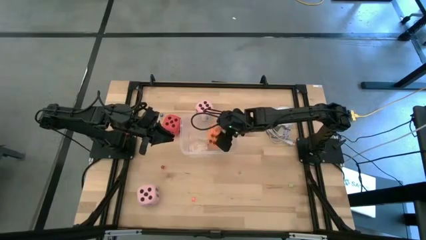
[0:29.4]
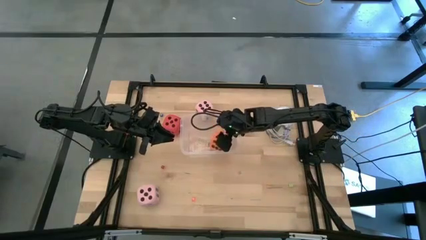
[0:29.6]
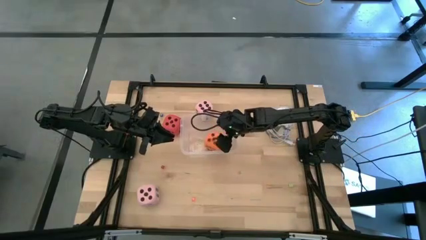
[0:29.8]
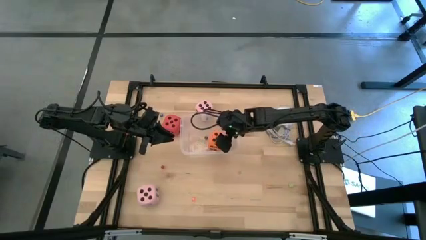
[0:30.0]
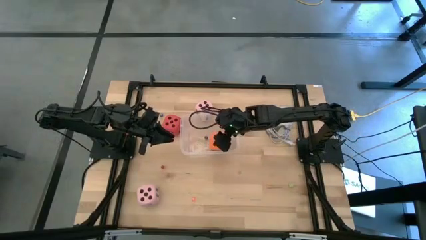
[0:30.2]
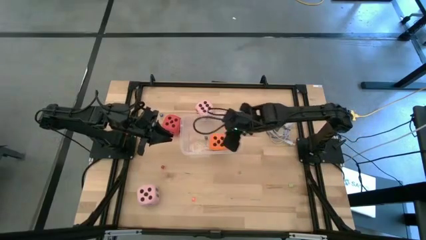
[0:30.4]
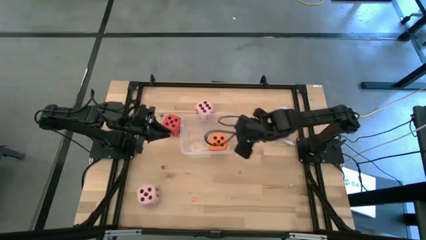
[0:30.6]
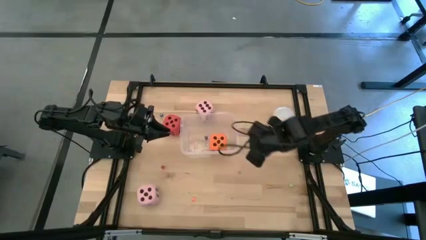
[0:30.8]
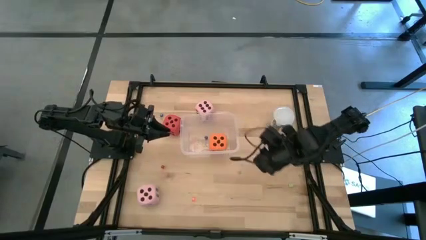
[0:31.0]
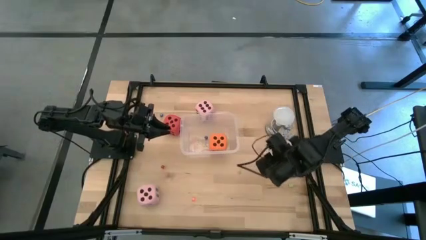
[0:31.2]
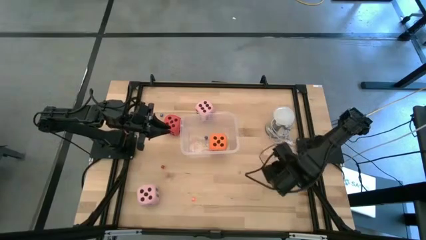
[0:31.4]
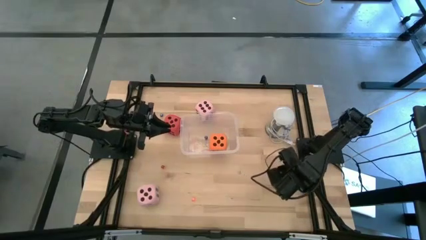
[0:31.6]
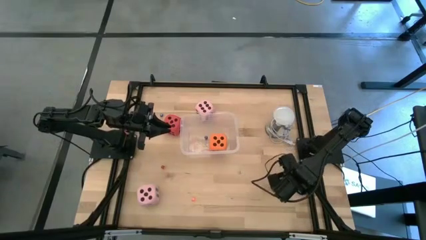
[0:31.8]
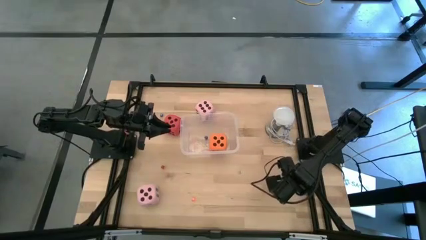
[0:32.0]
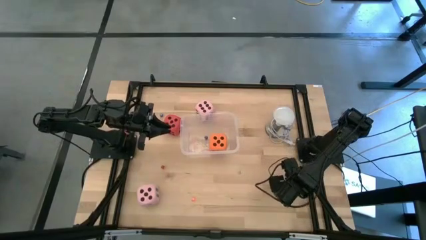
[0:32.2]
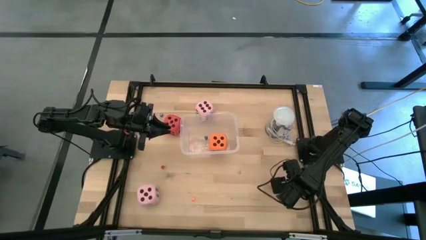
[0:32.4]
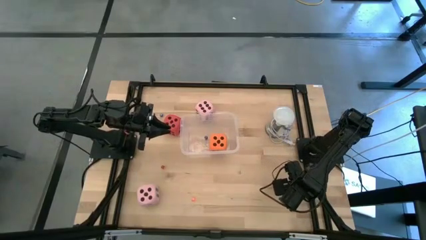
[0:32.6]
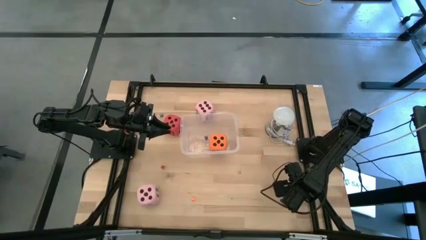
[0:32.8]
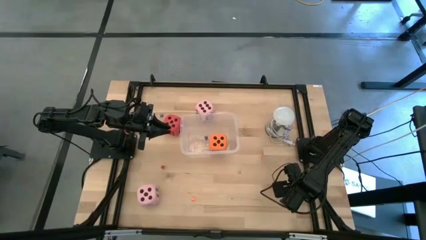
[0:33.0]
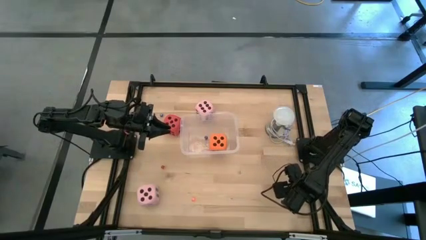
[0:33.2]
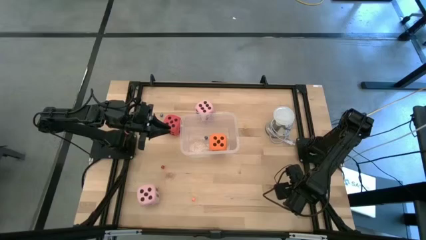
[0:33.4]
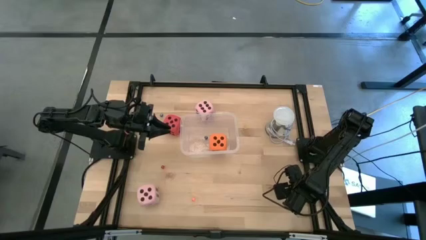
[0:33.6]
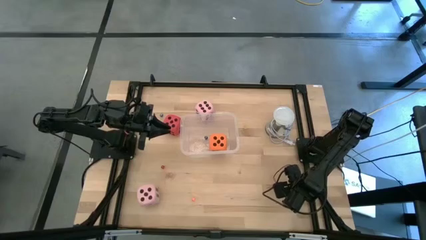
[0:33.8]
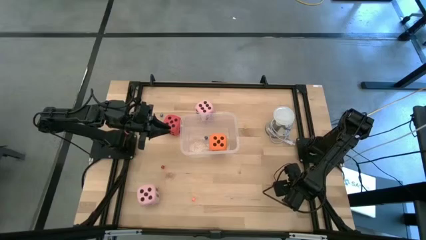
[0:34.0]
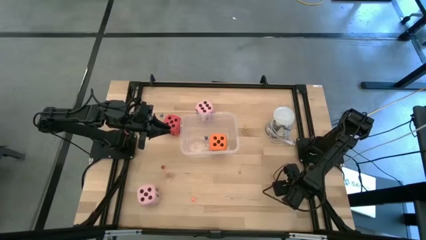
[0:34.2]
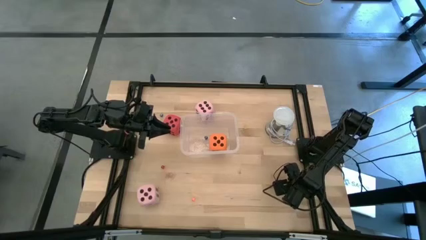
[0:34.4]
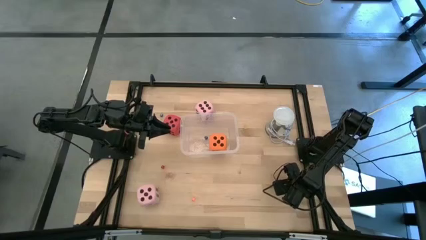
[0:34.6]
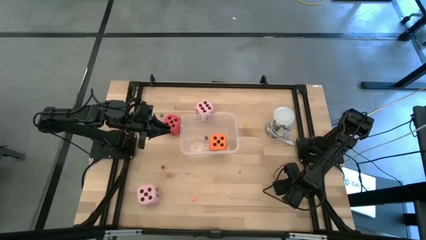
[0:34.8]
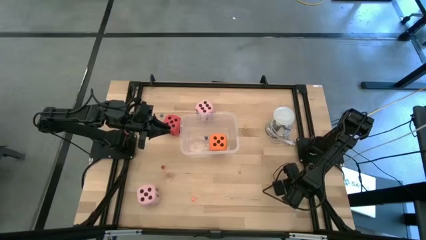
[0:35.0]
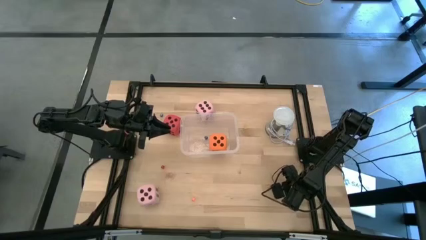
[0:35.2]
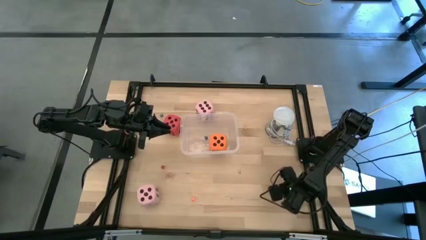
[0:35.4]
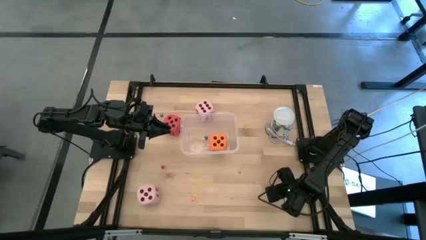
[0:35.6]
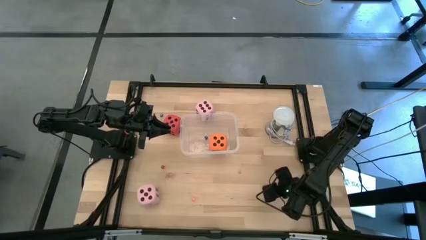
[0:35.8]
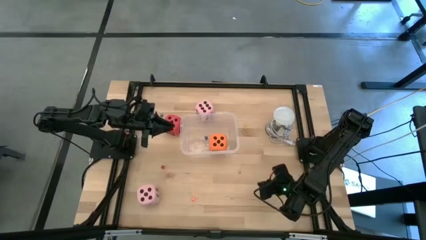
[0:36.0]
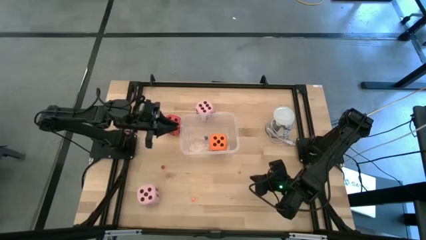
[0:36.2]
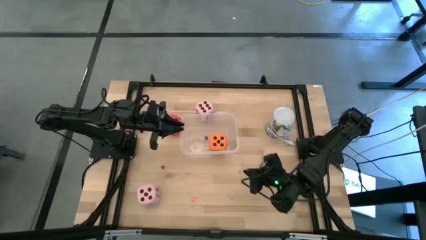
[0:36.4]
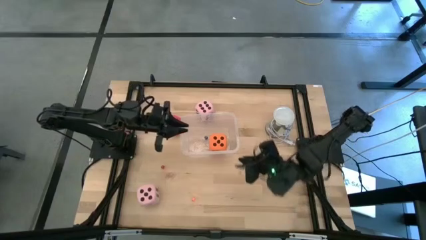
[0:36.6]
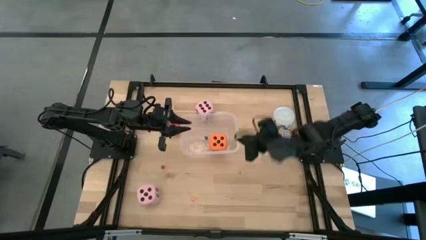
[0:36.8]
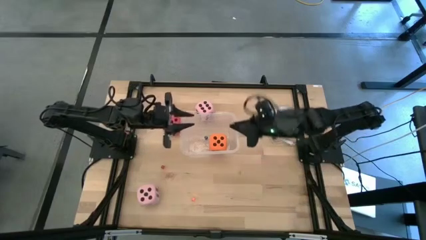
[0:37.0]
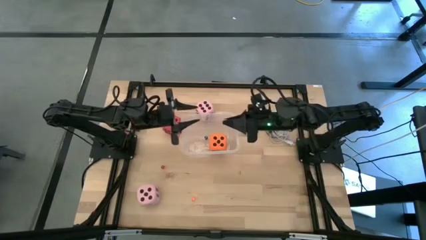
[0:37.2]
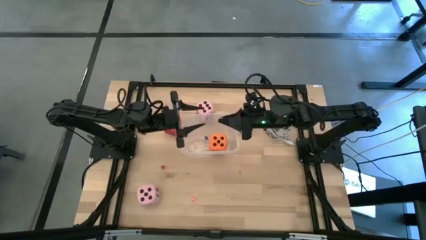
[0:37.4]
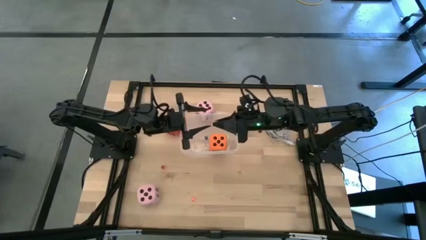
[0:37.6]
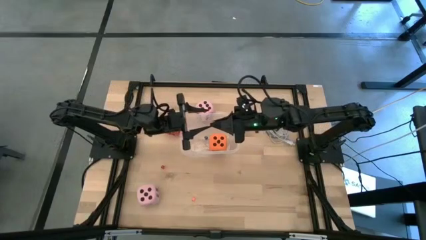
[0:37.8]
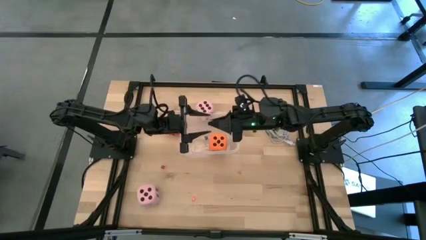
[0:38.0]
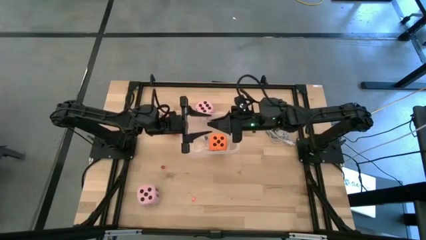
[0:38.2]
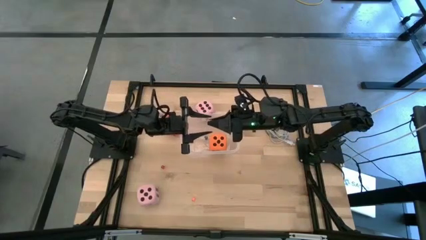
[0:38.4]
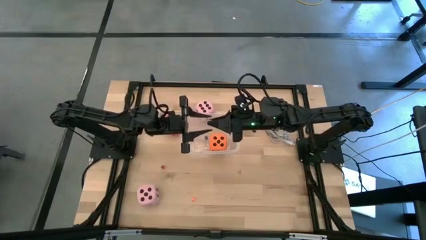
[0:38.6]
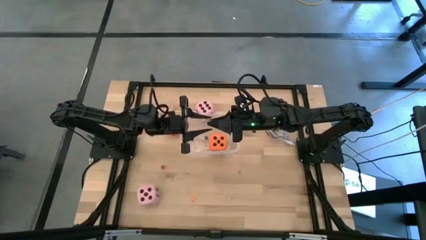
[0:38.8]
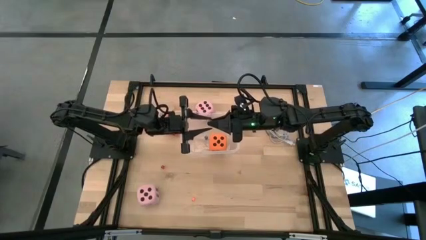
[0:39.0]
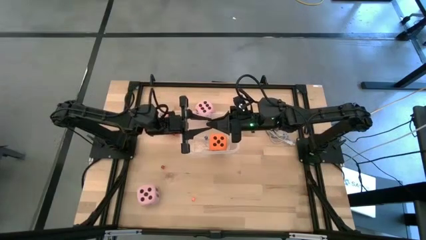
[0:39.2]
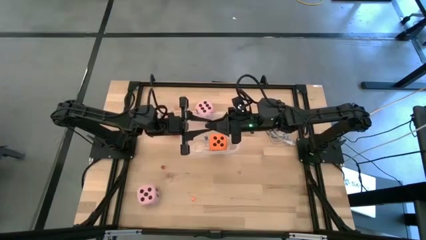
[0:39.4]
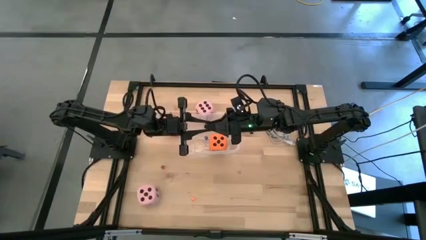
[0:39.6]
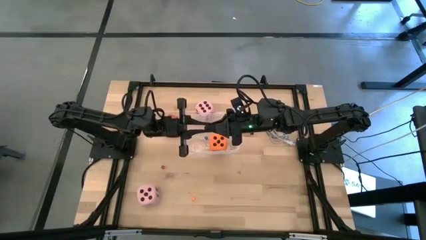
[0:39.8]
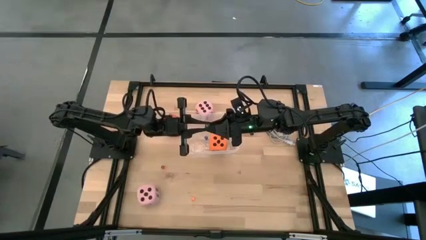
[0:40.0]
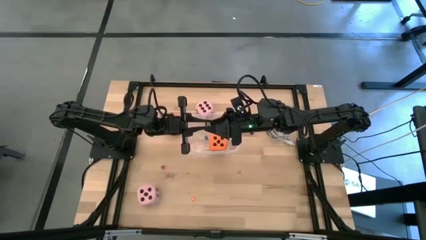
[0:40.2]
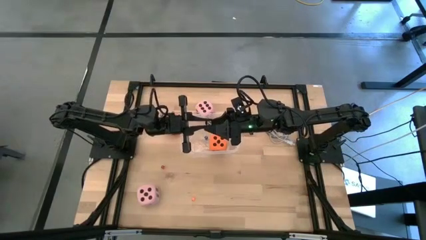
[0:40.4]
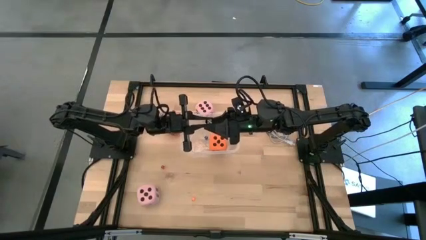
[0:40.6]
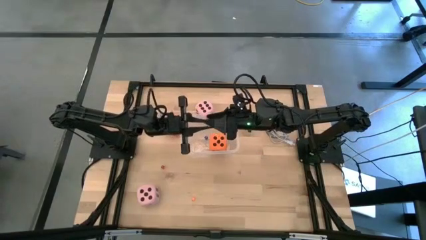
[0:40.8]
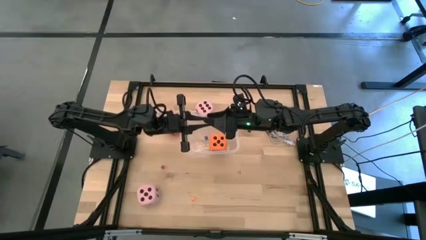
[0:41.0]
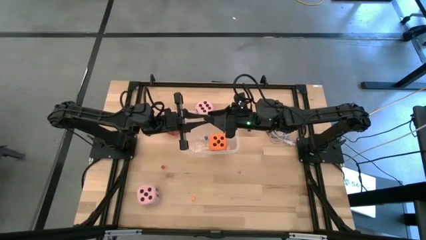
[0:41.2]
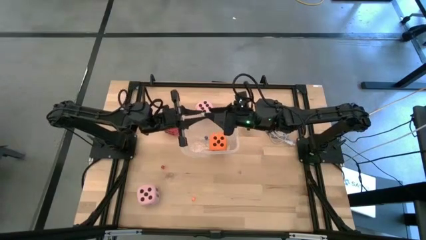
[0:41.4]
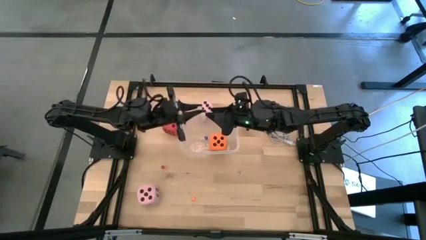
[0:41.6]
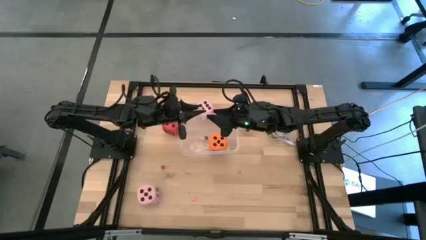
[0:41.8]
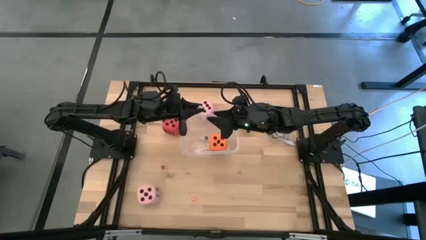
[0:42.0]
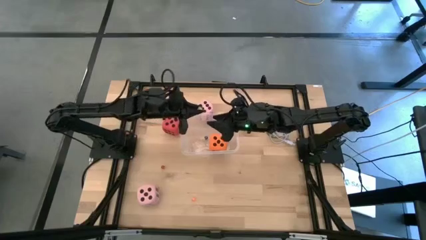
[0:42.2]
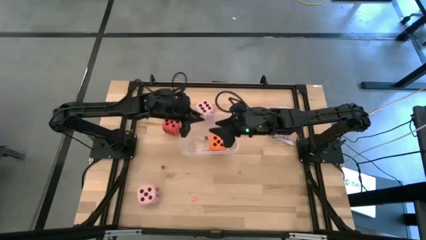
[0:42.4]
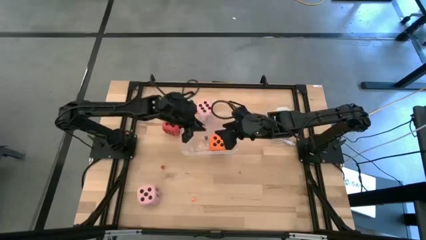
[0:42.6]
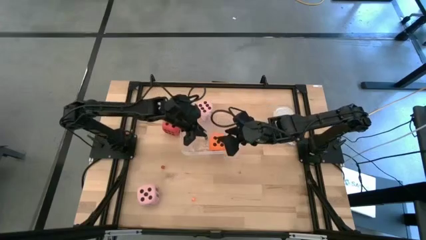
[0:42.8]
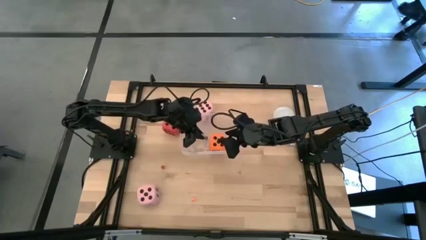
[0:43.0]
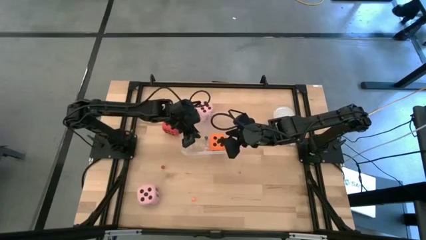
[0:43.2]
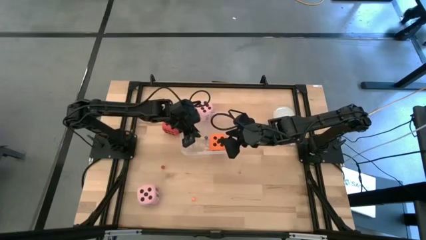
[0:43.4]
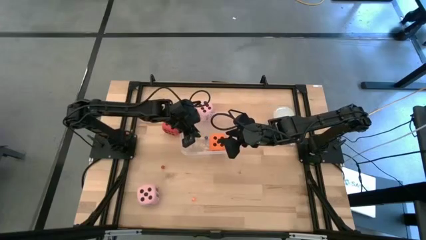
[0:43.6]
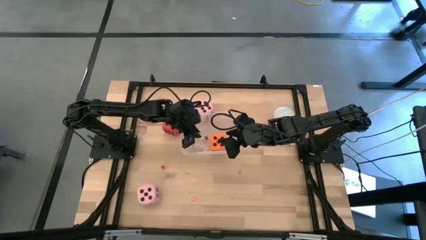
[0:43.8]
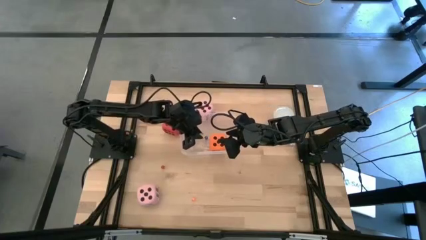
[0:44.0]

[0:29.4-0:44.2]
Task: Pick & Place Dice
Put the small green dice into the transparent bin

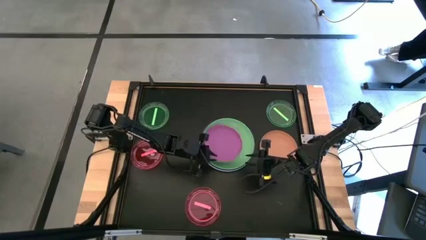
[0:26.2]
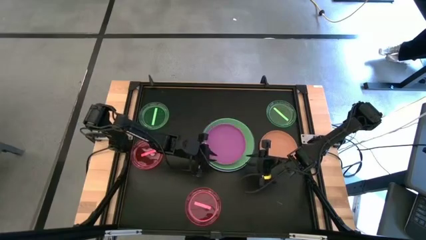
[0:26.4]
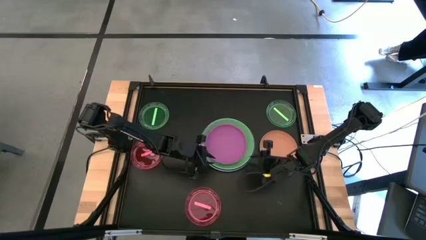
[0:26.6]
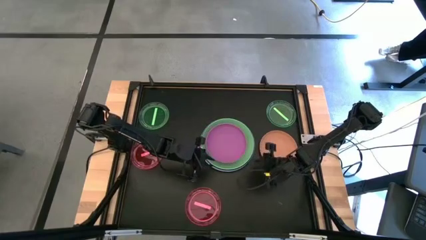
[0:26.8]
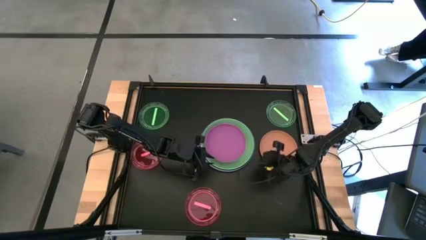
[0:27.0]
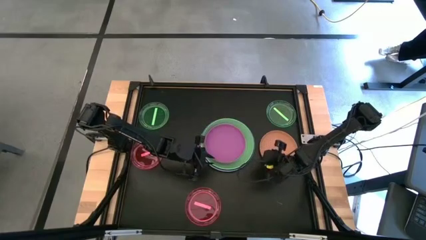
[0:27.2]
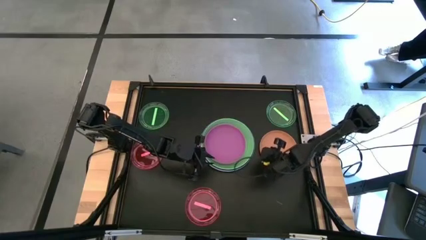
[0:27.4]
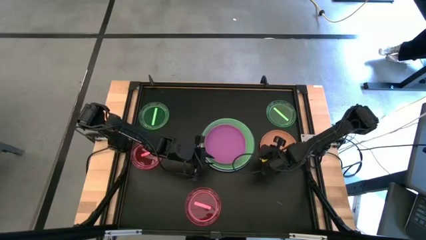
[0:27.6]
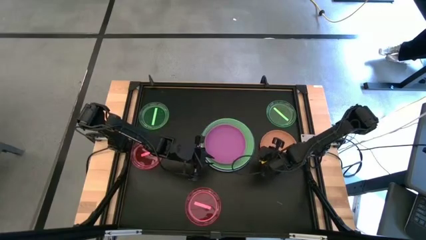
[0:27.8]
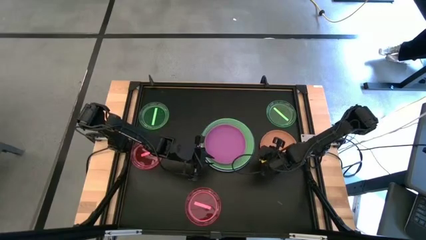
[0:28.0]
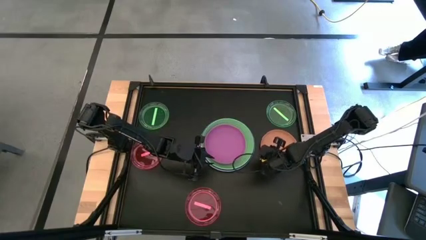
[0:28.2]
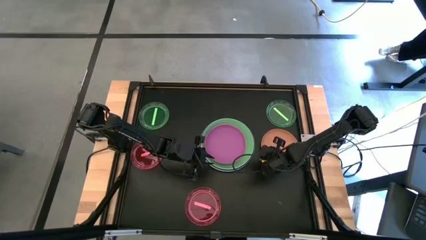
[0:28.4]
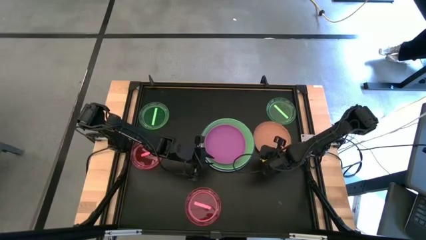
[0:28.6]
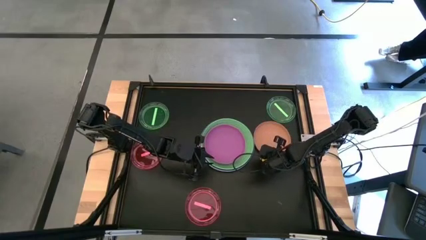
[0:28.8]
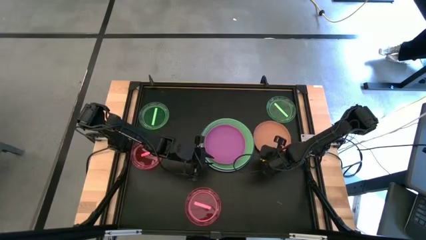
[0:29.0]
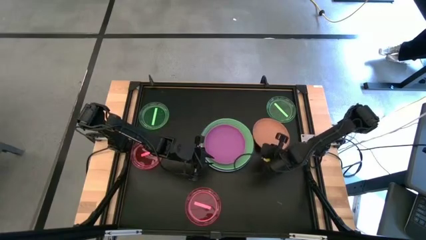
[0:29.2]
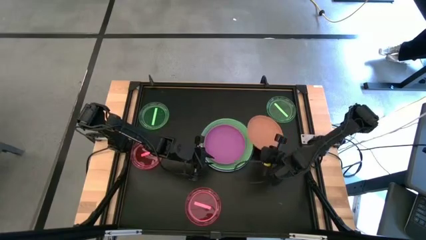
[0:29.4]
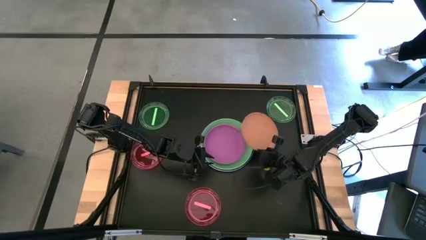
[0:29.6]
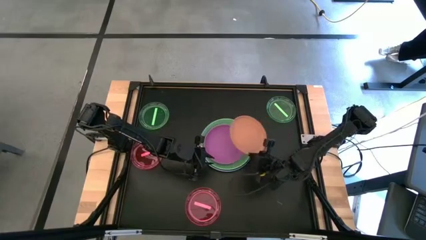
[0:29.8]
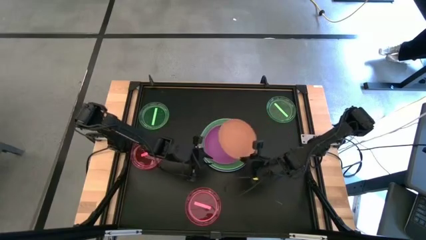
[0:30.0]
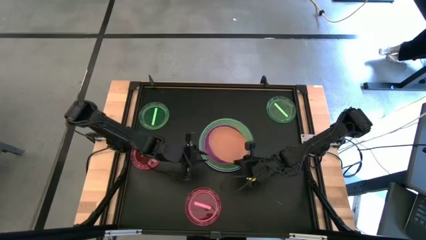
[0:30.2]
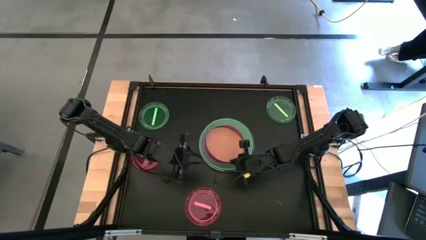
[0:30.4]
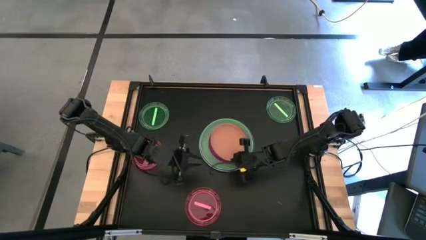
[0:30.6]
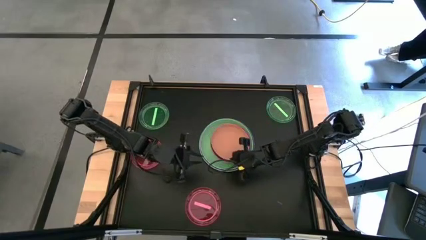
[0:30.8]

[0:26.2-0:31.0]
Task: Stack plastic plates
Stack the small orange plate on the small pink plate
